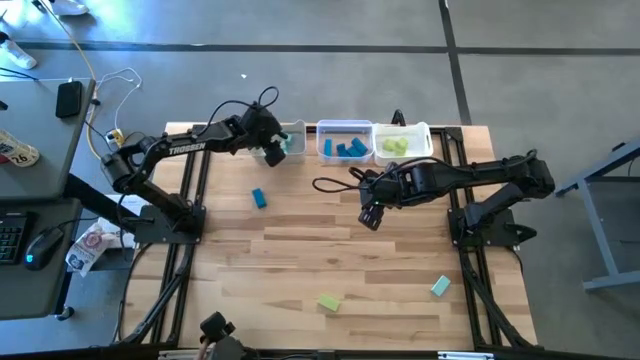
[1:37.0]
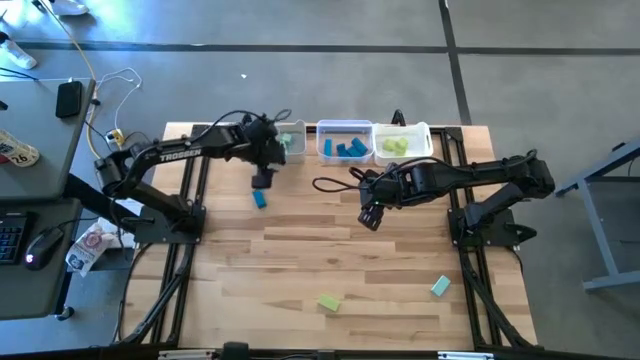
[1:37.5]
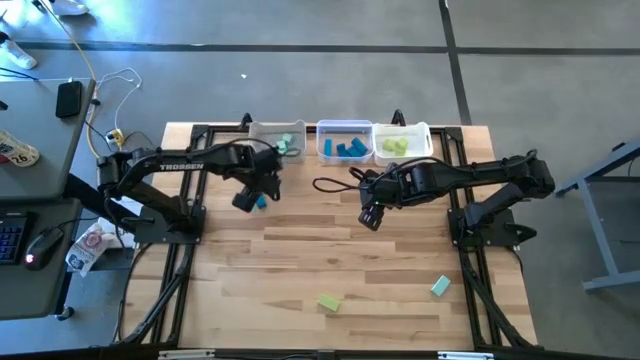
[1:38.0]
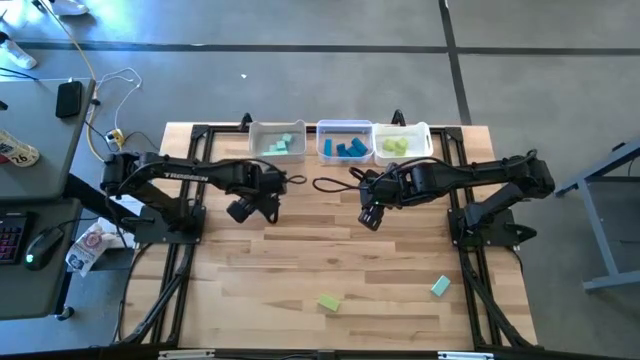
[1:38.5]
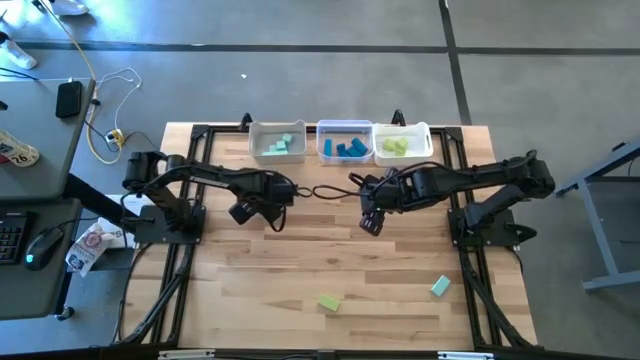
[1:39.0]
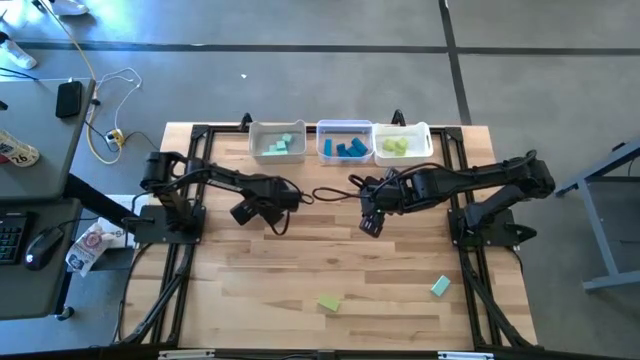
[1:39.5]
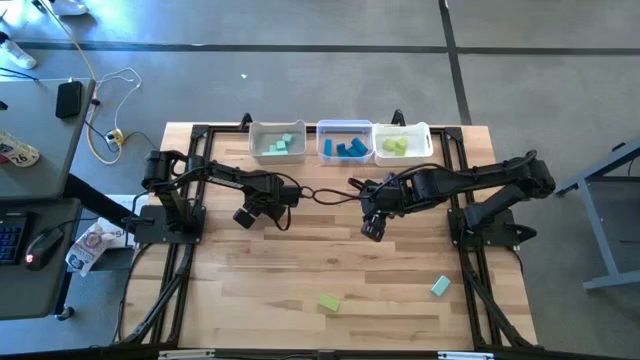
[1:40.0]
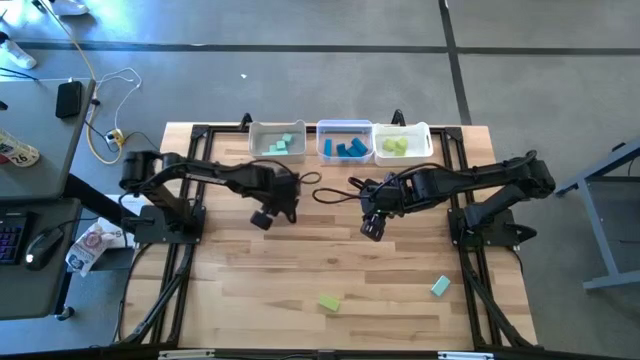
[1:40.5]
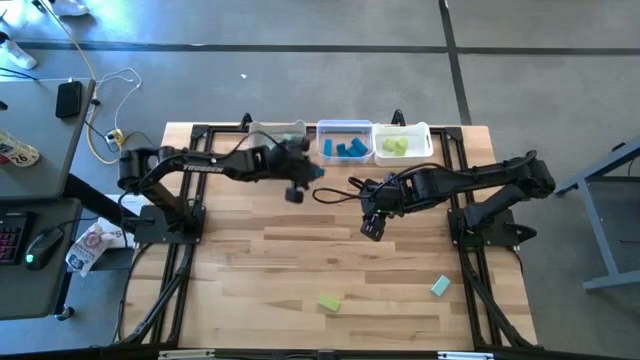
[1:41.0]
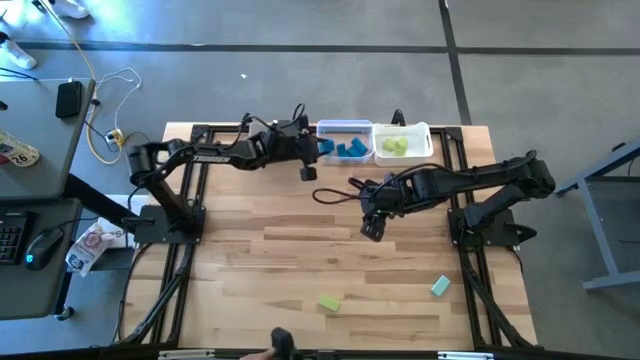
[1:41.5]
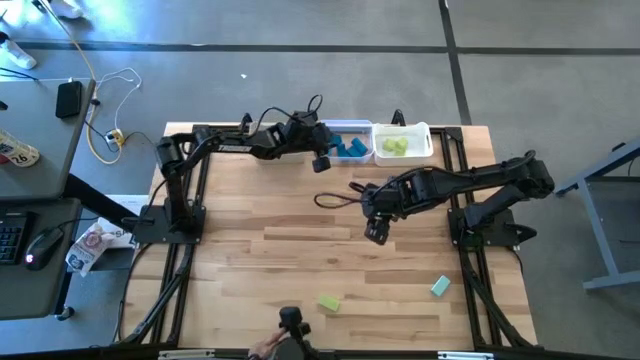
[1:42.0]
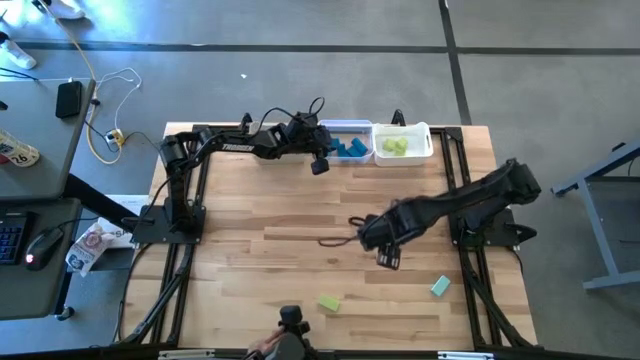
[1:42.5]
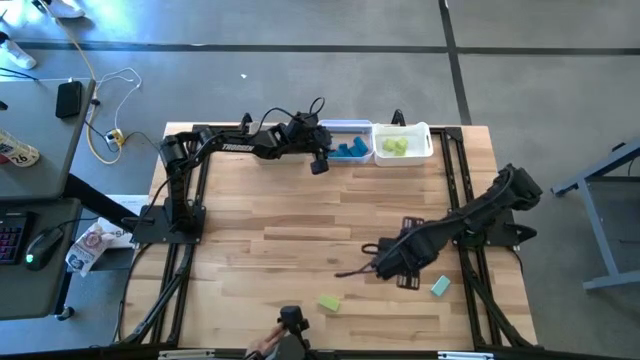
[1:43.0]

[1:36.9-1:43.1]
Task: Sort & place blocks by color
Put the blue block into the transparent bin

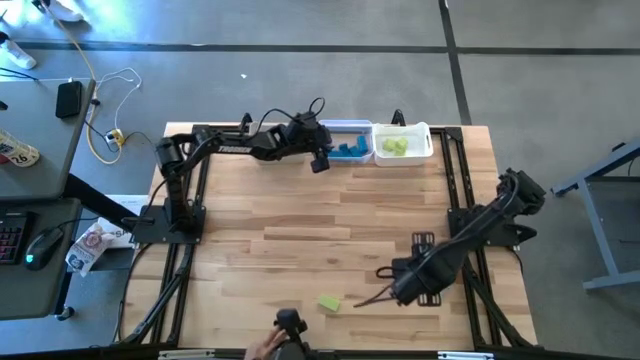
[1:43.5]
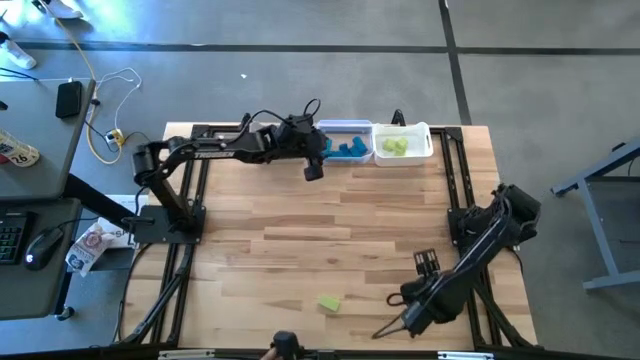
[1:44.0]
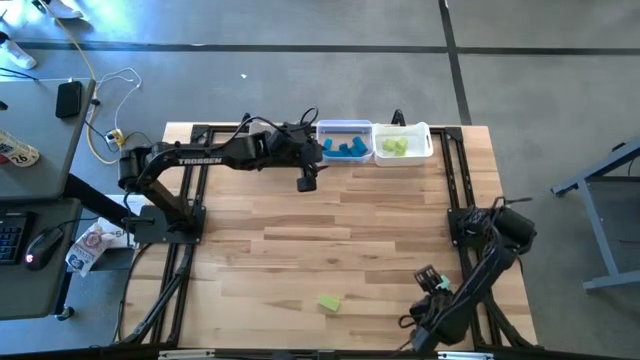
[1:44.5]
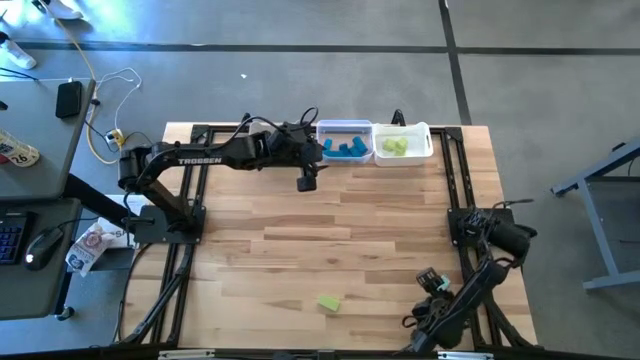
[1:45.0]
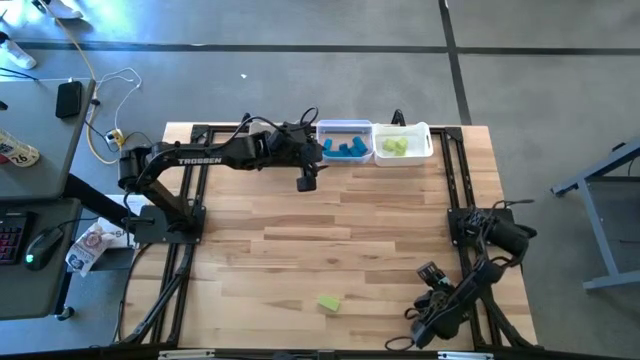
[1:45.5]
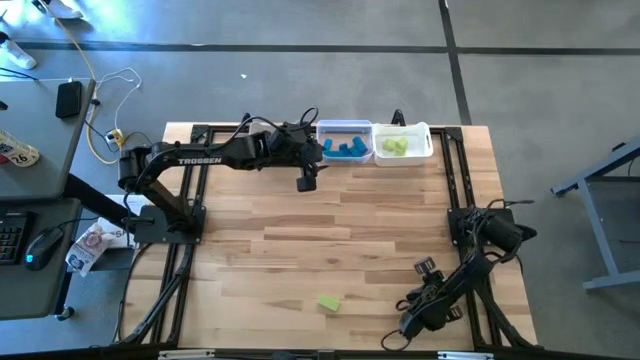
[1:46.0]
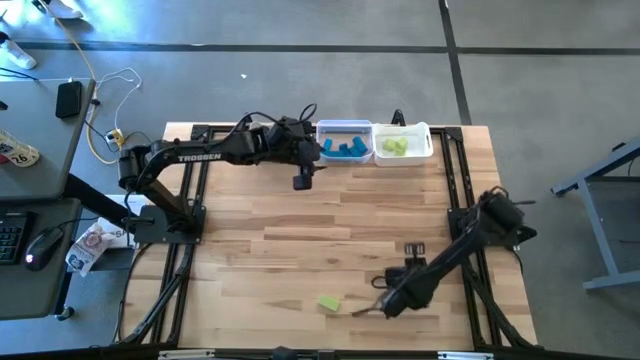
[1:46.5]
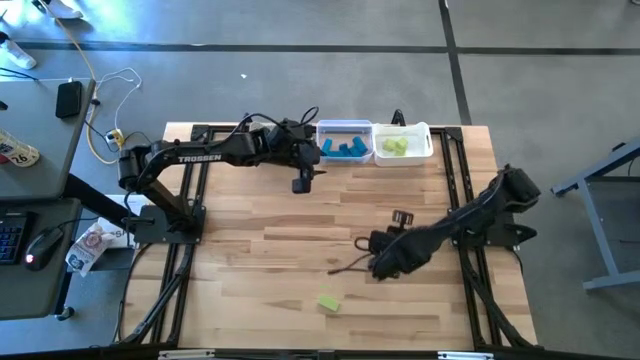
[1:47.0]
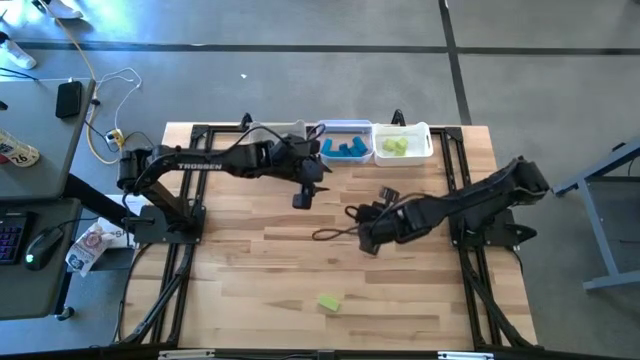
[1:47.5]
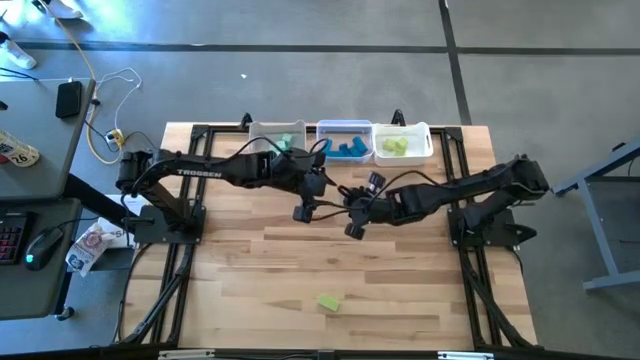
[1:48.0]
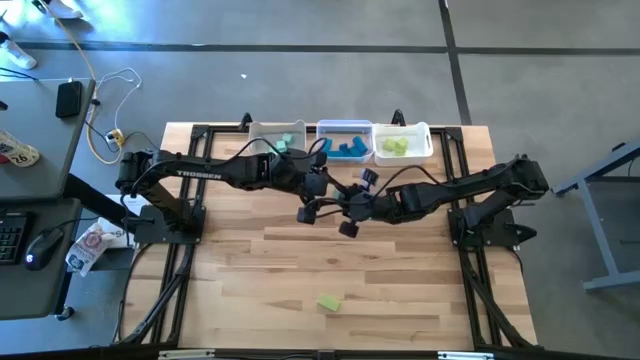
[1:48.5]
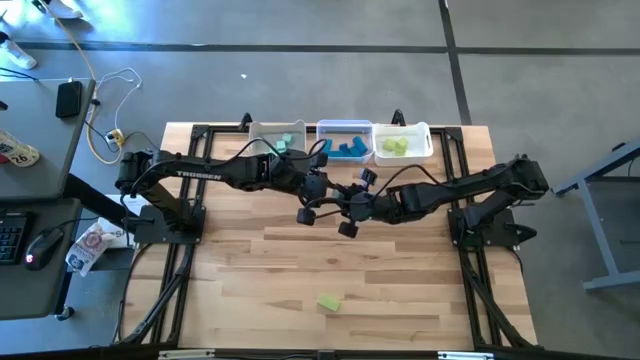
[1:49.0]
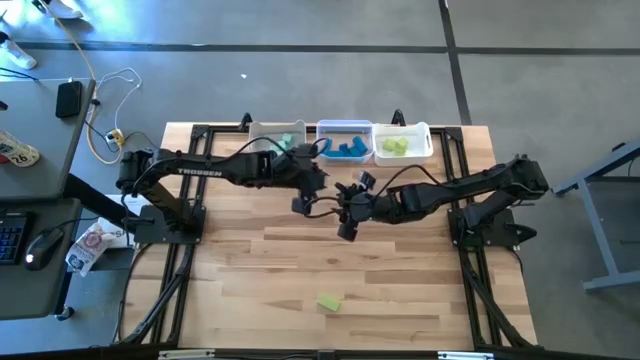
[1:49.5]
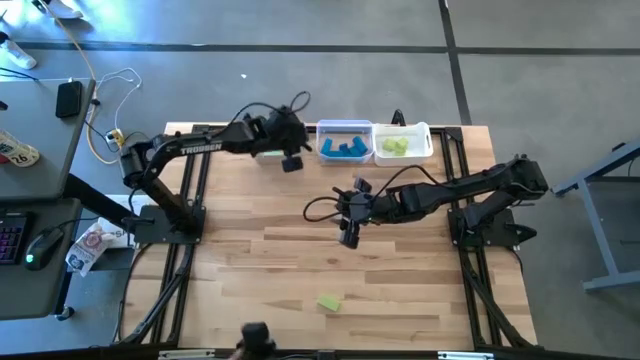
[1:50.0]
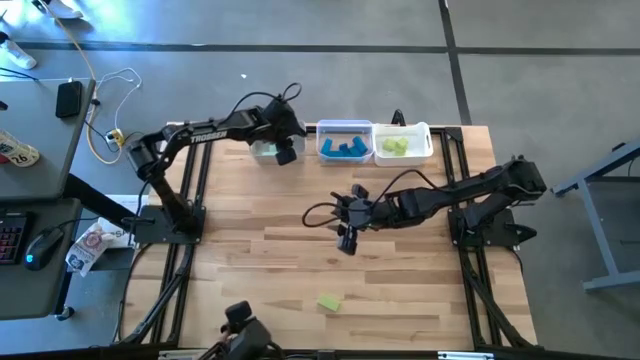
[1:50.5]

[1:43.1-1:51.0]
Put the light blue block into the gray bin

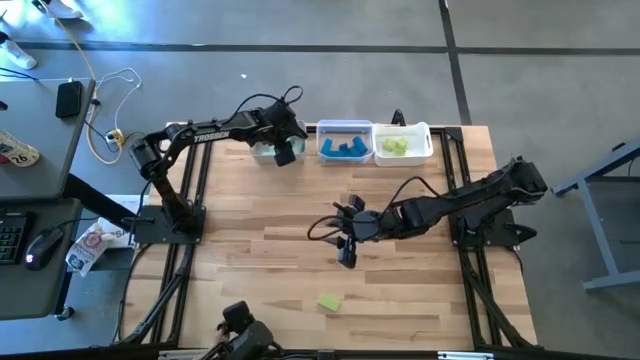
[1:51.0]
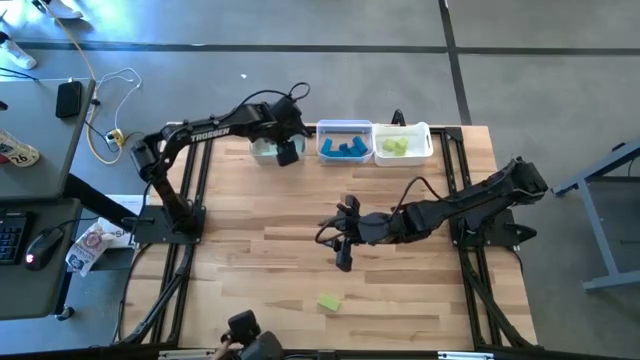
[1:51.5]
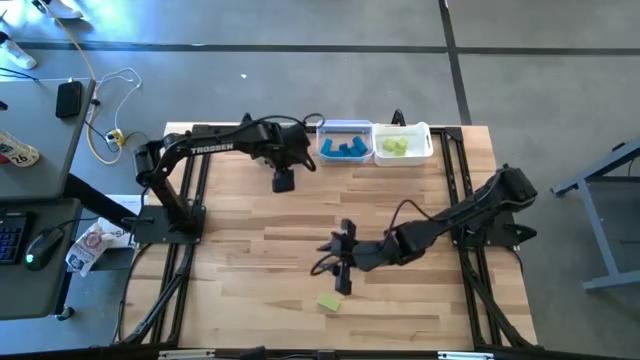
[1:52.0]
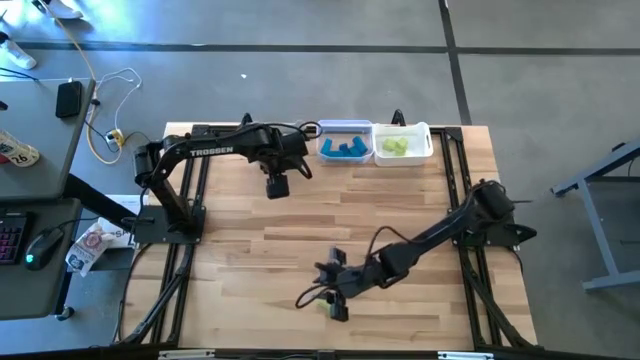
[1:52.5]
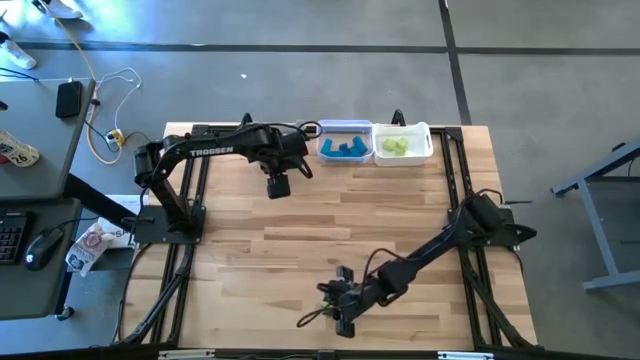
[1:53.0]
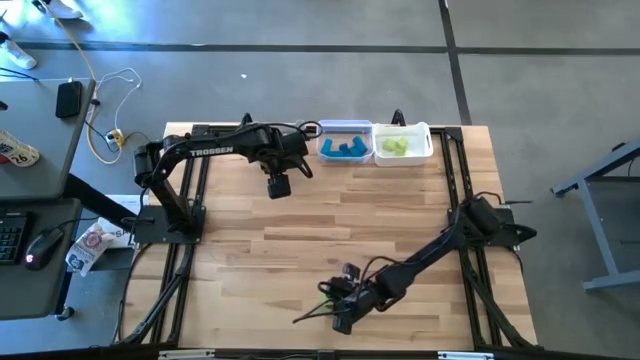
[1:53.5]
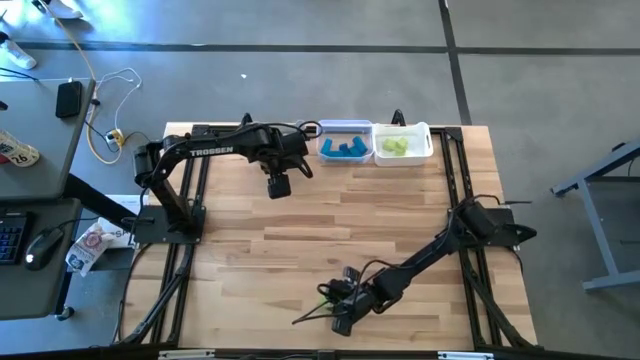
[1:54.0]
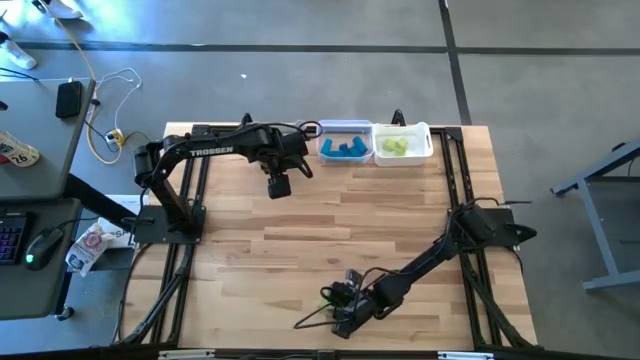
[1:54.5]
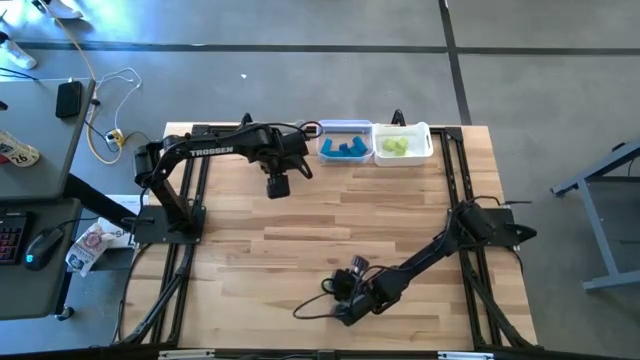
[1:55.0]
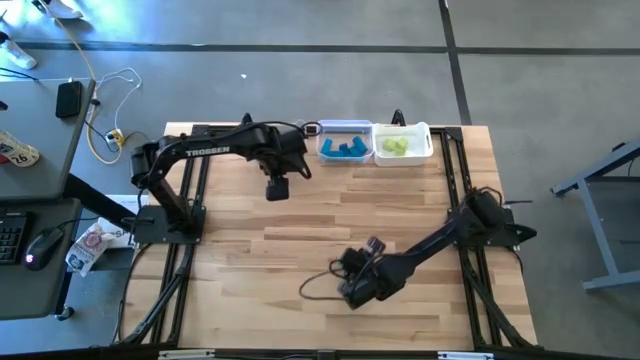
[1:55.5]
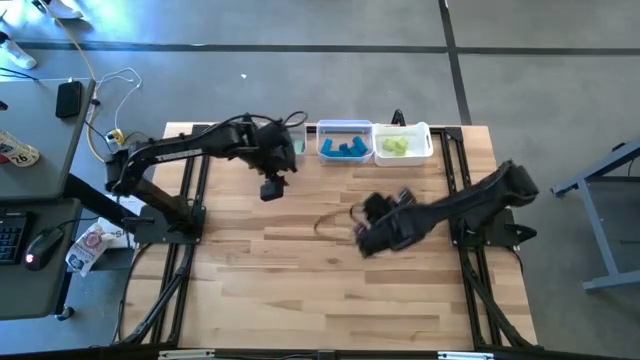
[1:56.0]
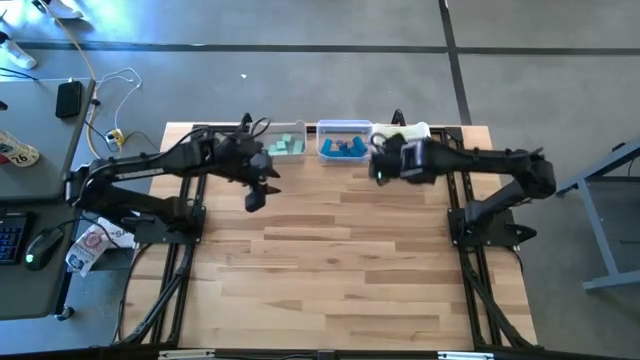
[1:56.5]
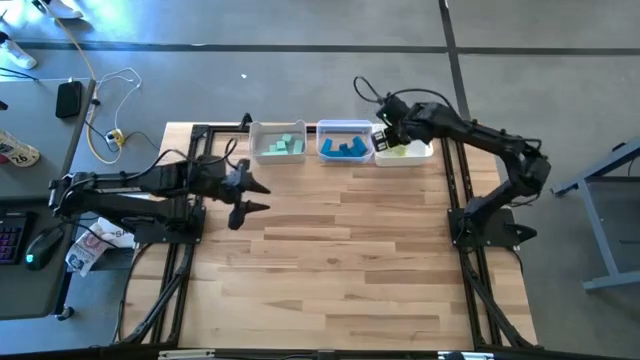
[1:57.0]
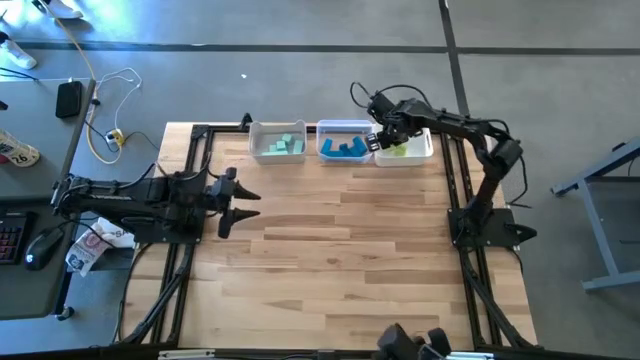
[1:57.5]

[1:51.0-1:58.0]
Put the green block into the white bin
